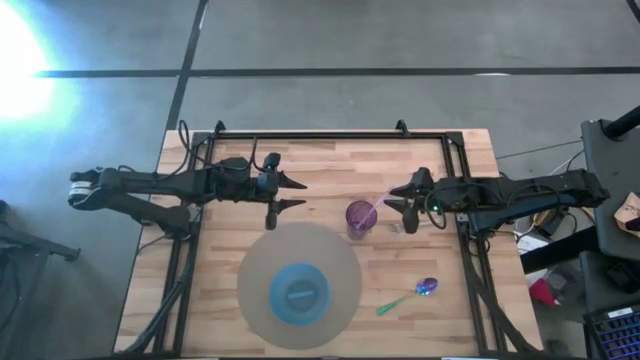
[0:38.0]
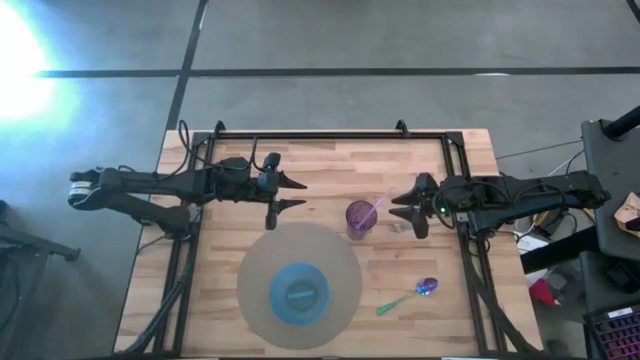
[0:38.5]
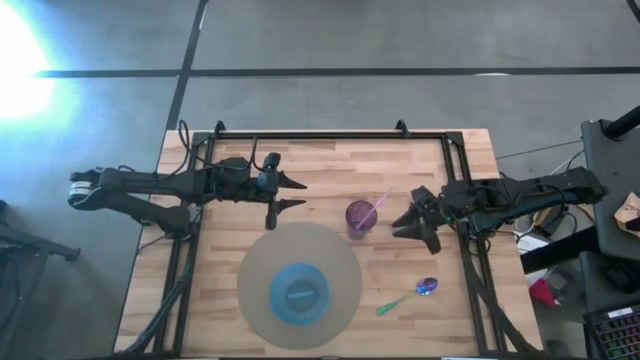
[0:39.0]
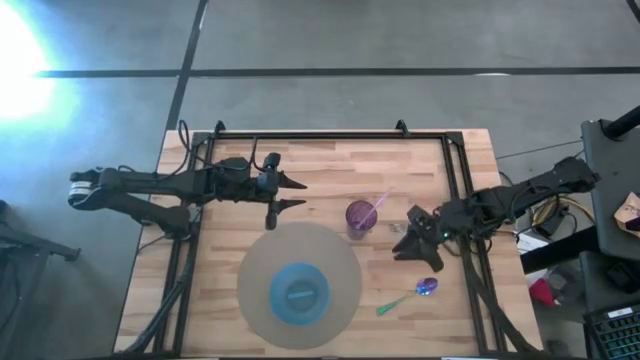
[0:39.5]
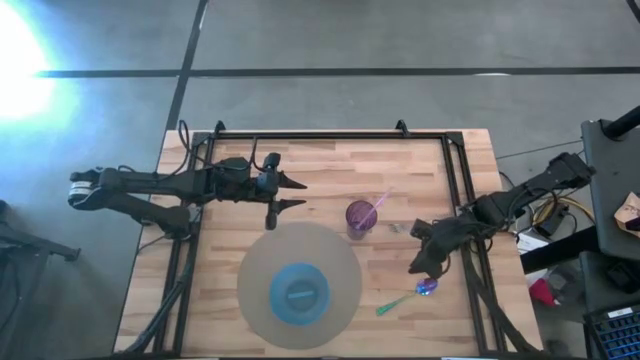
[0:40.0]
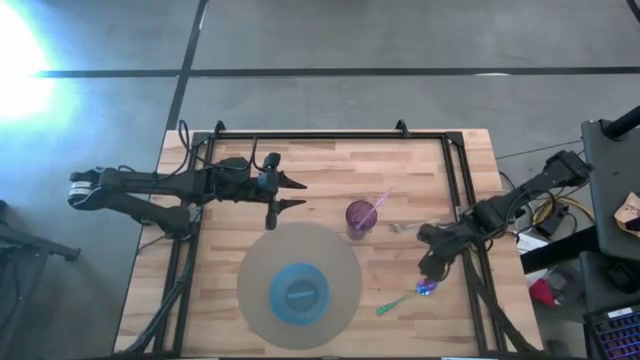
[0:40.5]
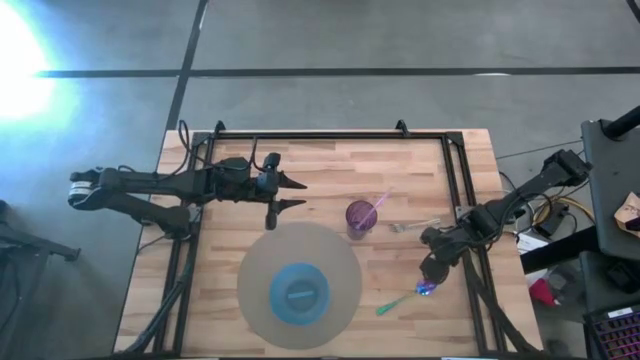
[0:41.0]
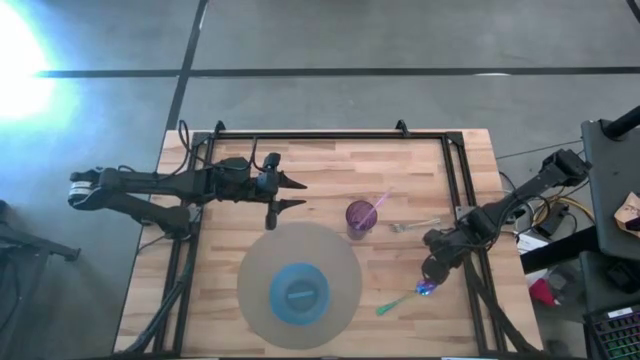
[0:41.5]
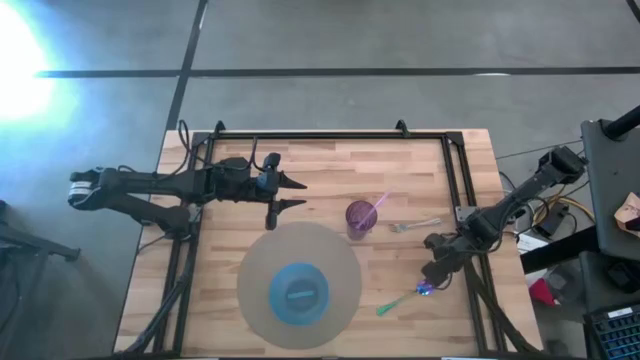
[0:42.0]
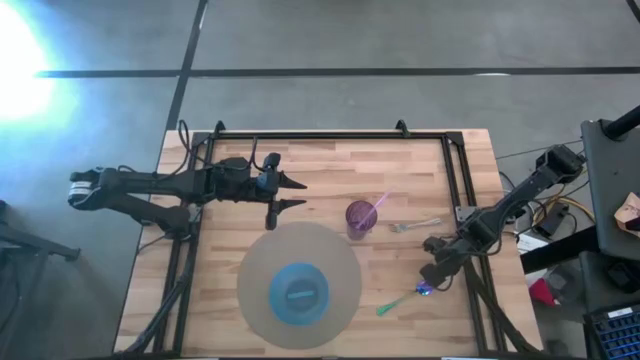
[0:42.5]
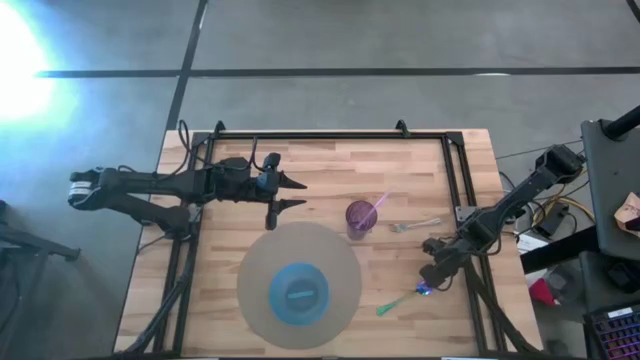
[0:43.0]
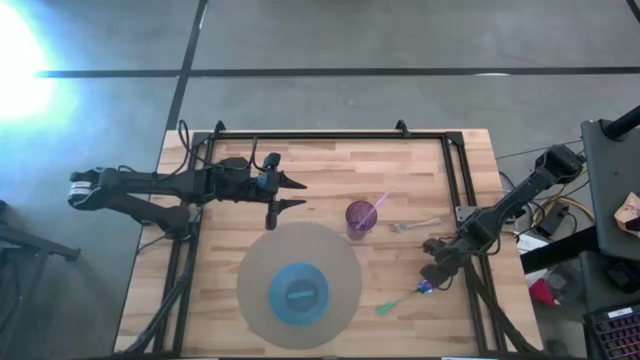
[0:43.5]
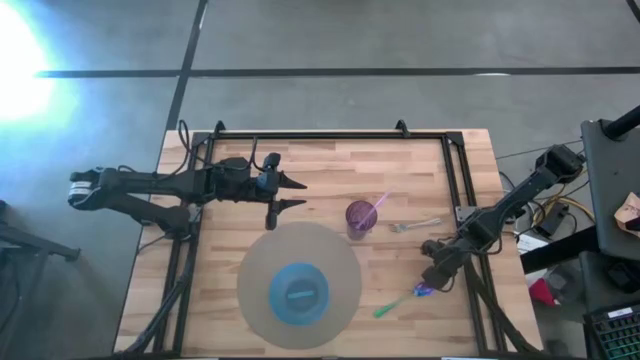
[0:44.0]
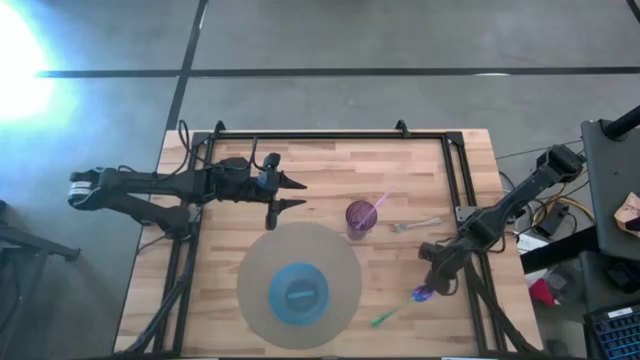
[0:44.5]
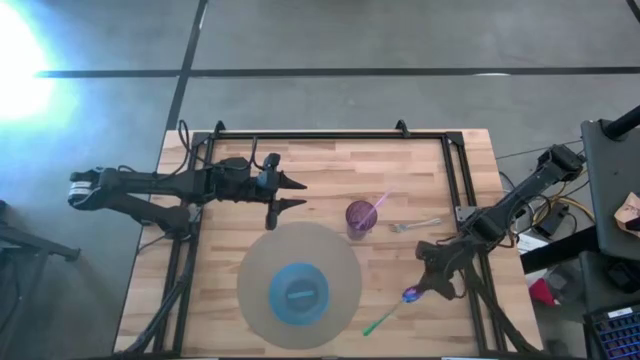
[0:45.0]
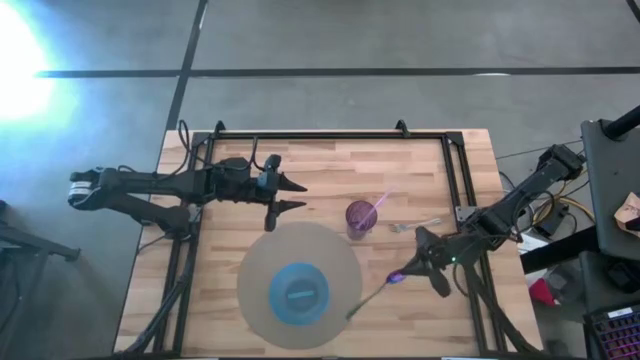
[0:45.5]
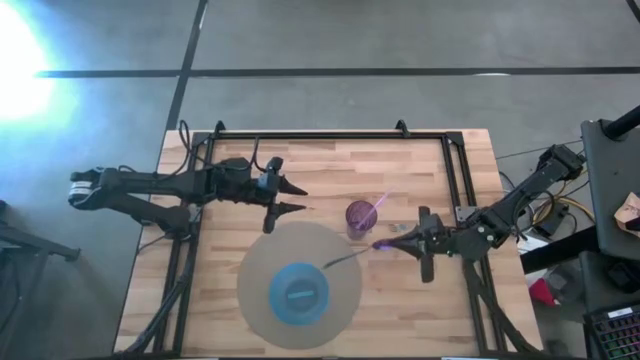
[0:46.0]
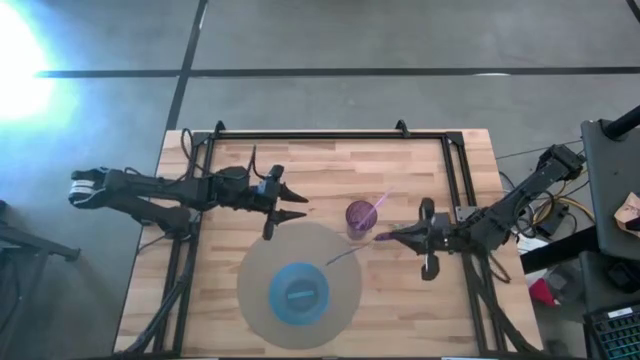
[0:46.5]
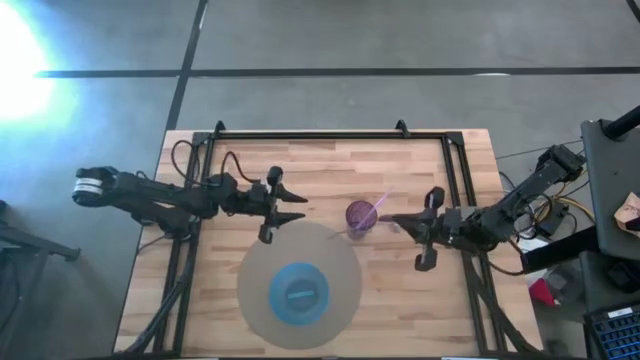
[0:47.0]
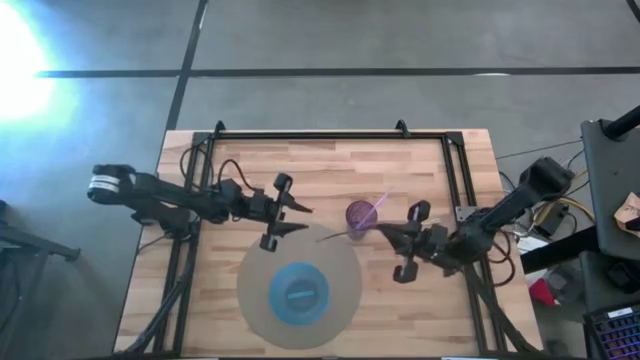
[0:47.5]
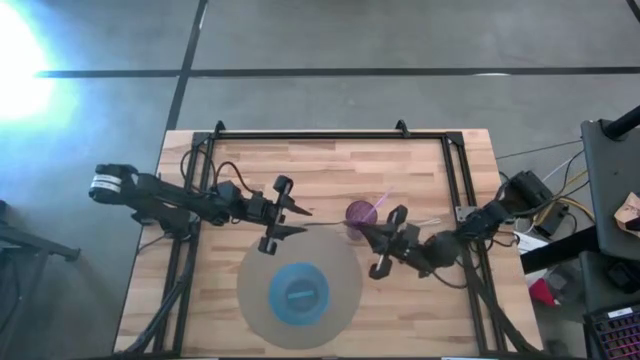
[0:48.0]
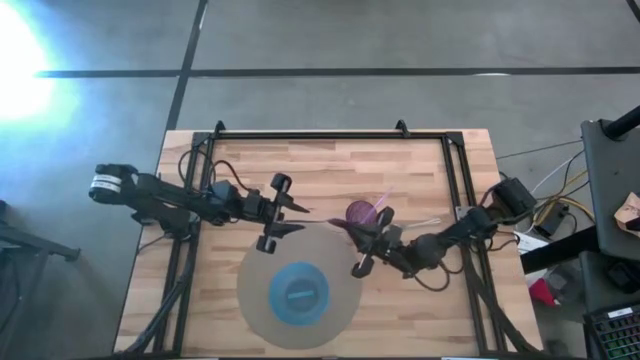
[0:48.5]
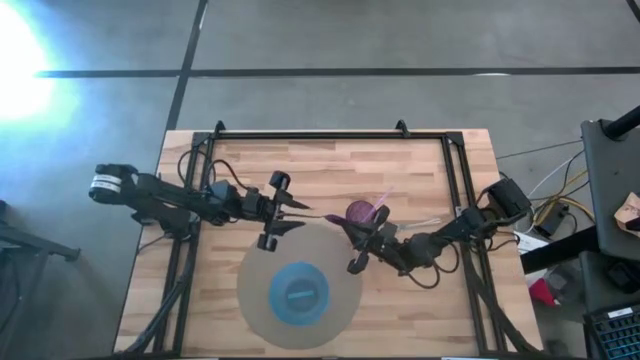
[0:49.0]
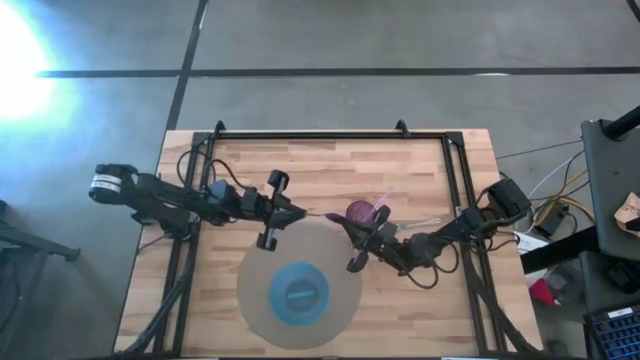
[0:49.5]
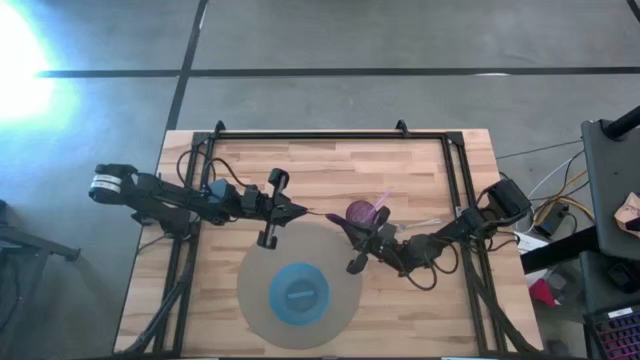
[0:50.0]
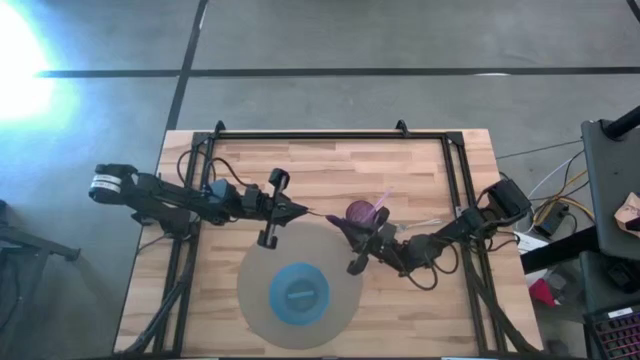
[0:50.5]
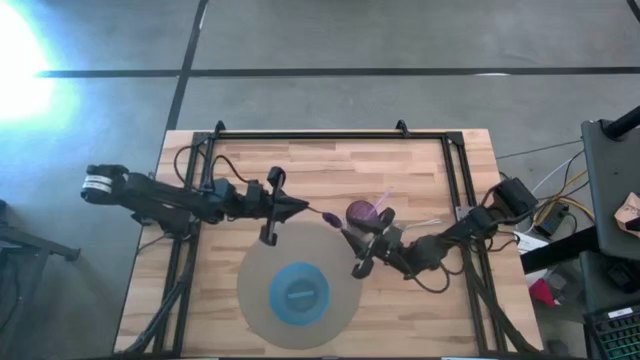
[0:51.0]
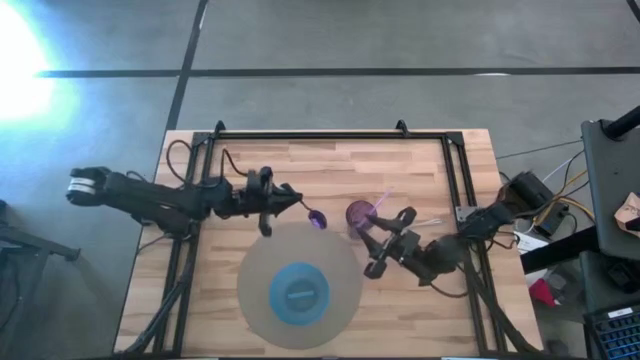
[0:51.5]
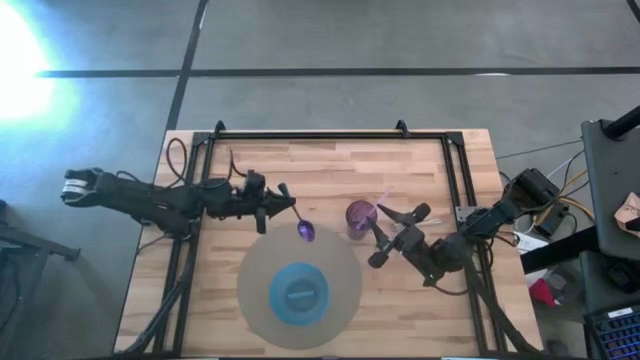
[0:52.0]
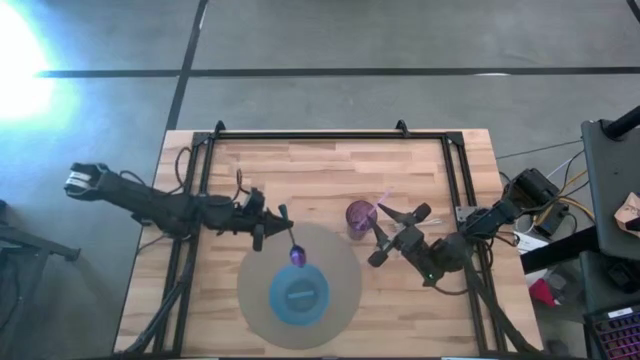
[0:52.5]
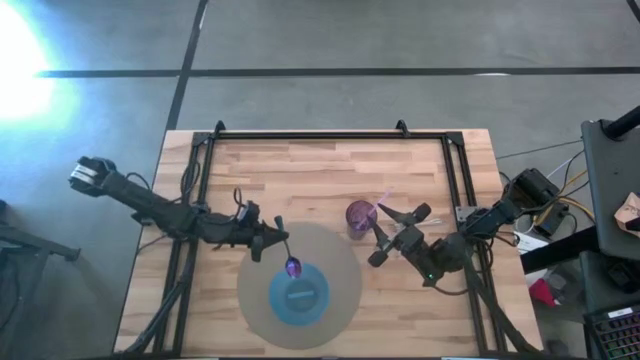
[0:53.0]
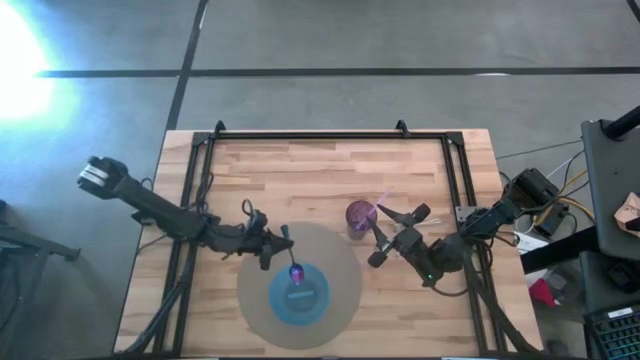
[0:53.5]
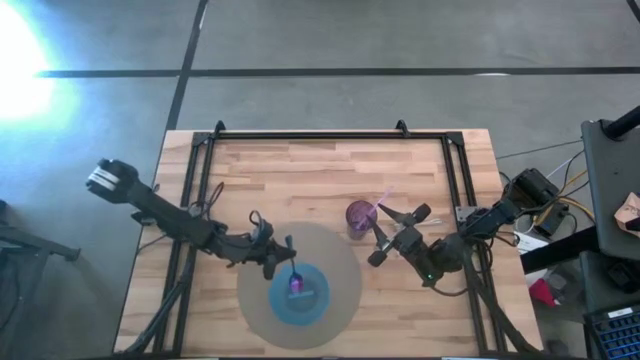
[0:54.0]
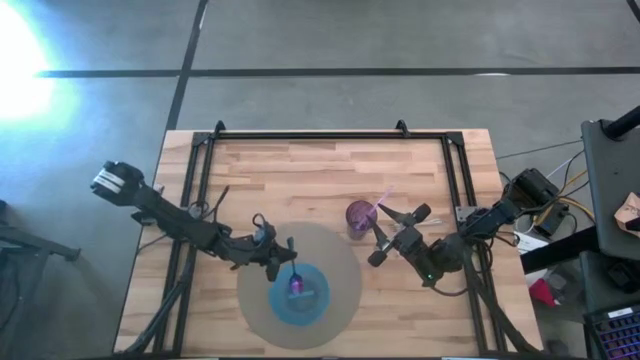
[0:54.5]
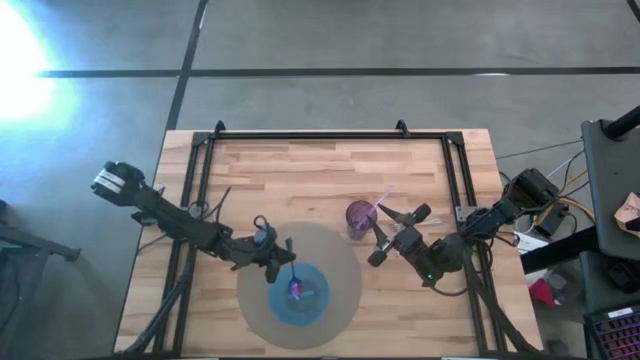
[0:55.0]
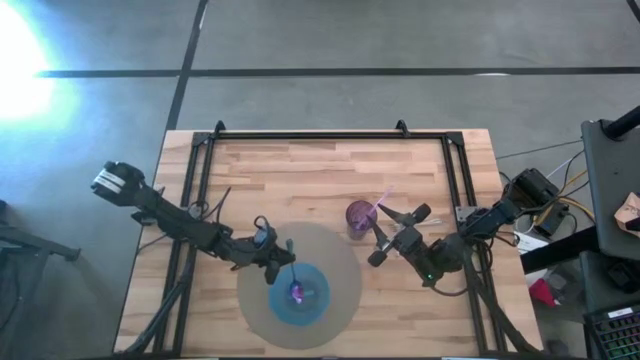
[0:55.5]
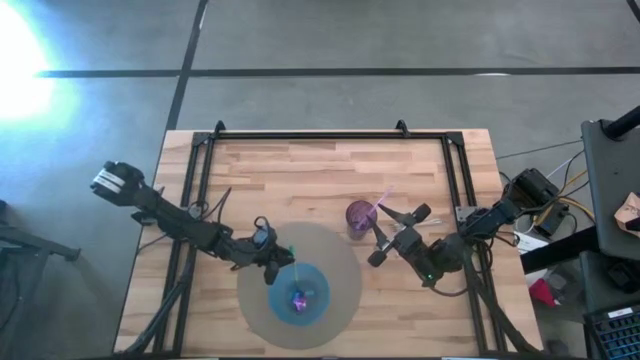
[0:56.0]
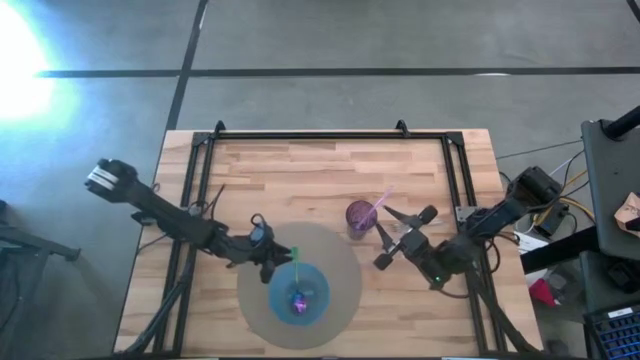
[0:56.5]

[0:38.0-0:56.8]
Task: Pick & Place Utensil
Put the blue spoon into the blue bowl

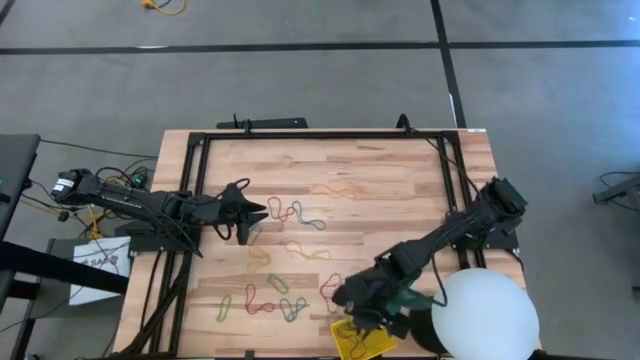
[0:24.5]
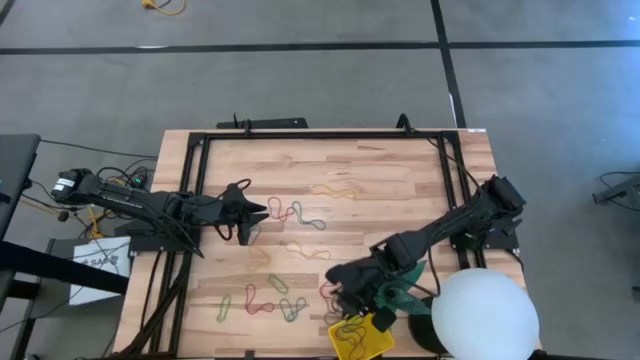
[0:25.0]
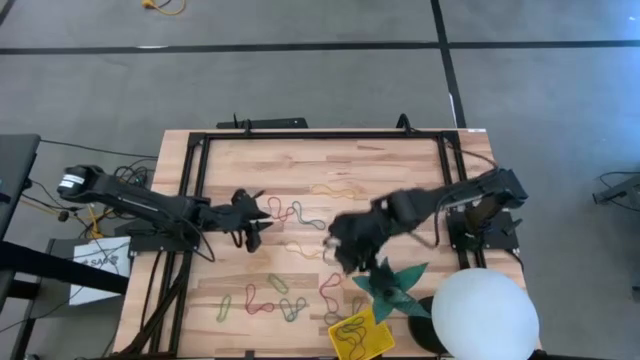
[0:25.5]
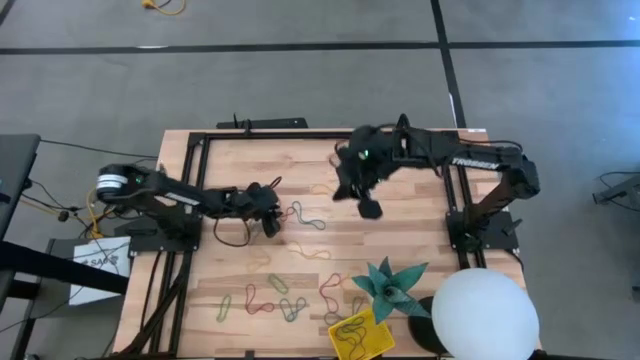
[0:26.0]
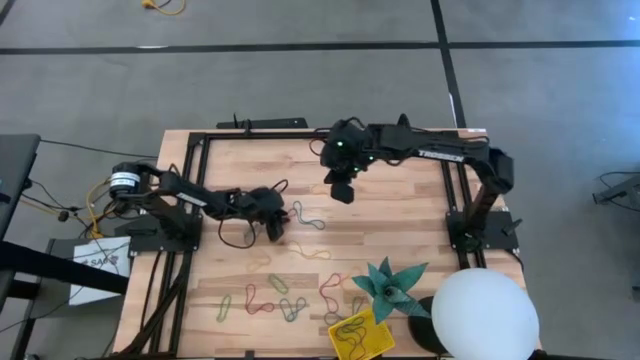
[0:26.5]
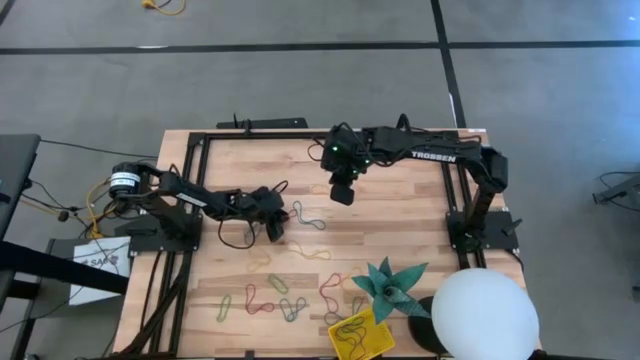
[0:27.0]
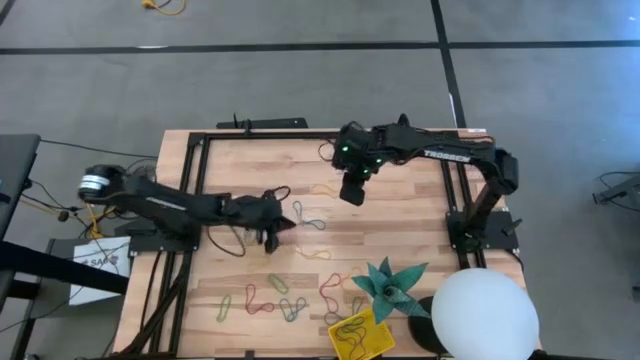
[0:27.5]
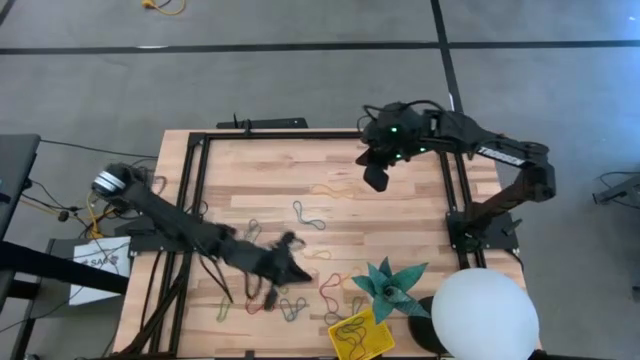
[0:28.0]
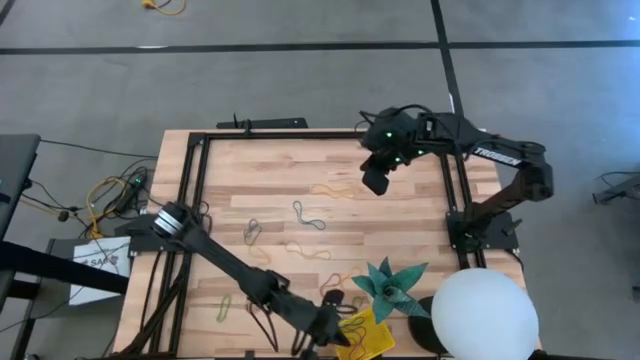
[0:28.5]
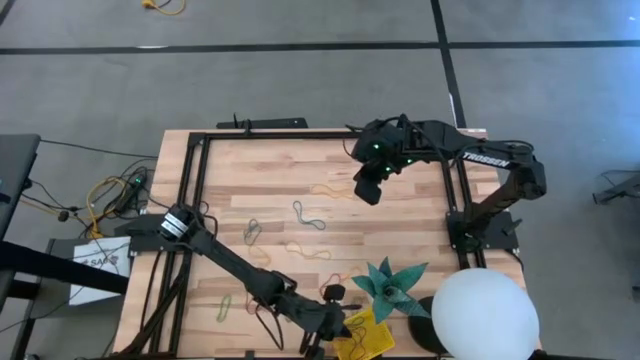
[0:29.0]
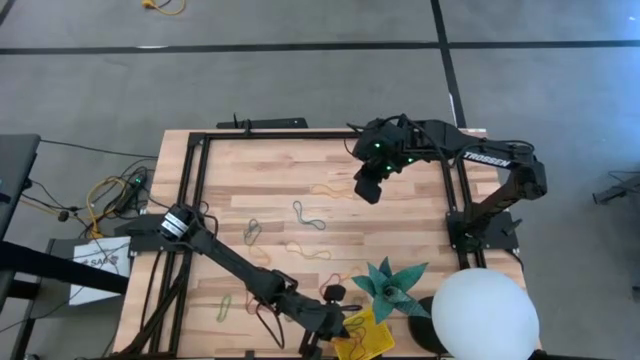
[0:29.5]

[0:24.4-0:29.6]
Task: Pick and place items into bin
Put the red rubber band into the yellow bin
